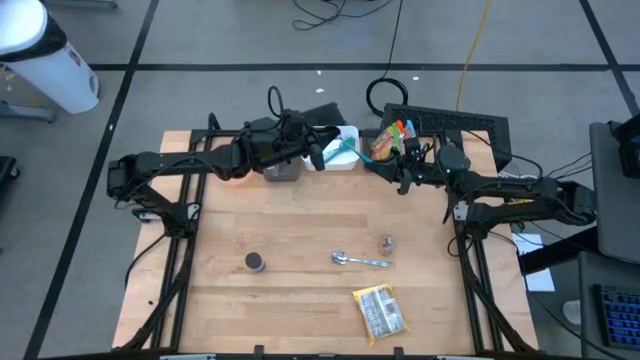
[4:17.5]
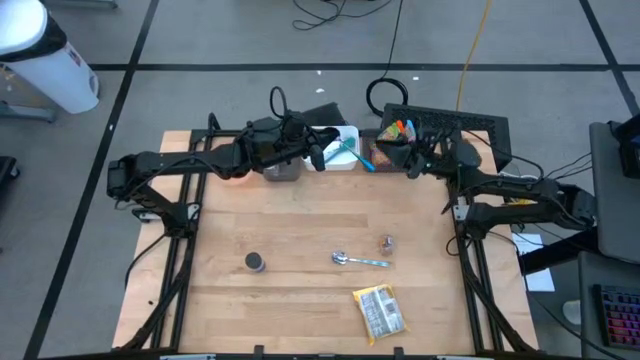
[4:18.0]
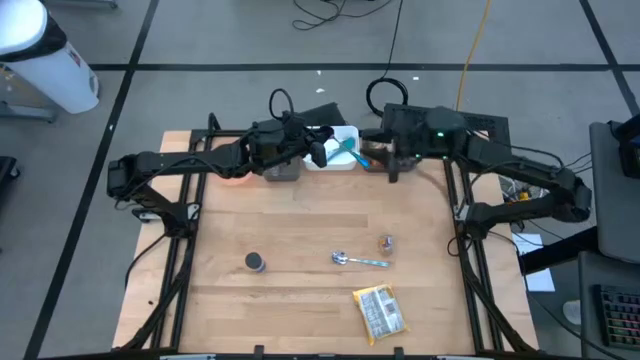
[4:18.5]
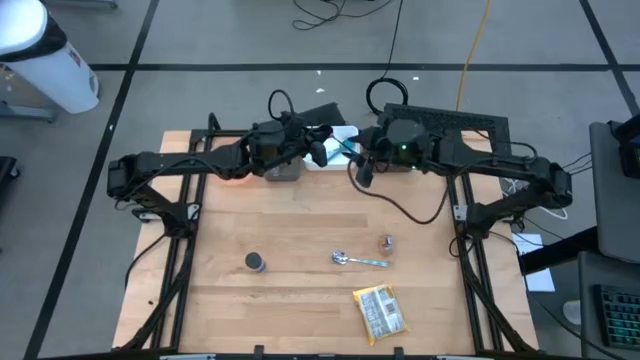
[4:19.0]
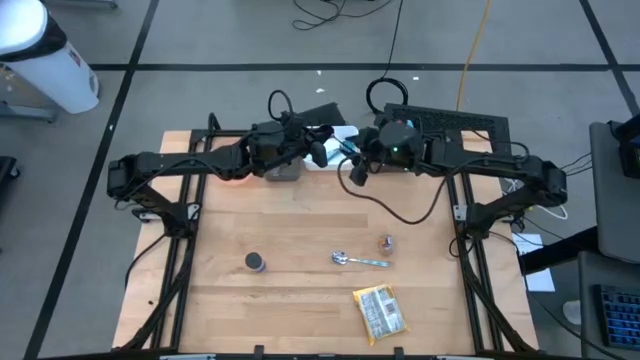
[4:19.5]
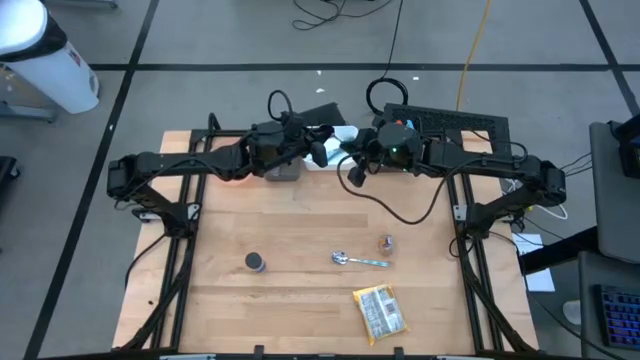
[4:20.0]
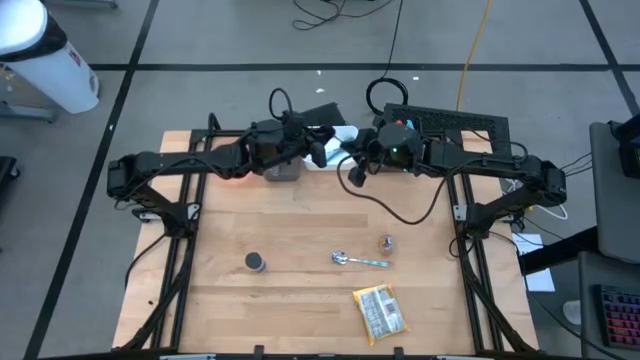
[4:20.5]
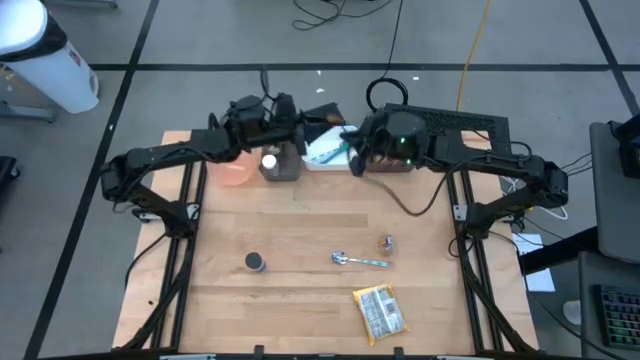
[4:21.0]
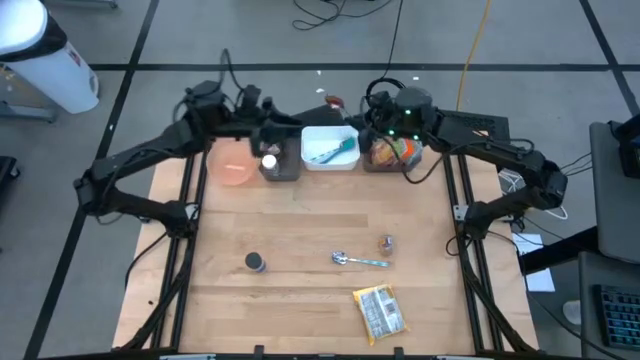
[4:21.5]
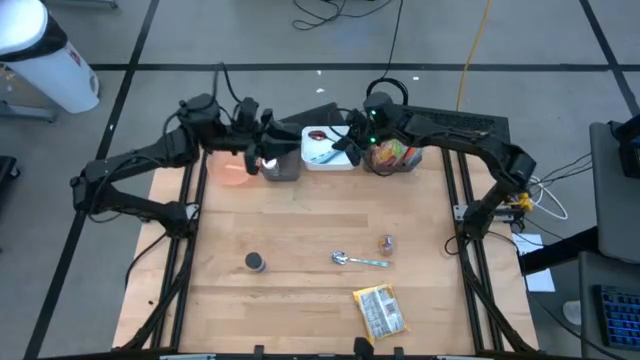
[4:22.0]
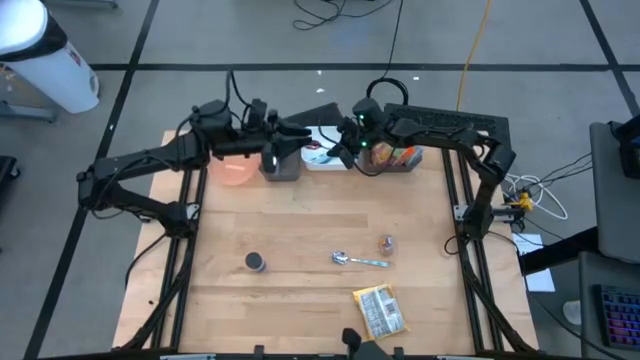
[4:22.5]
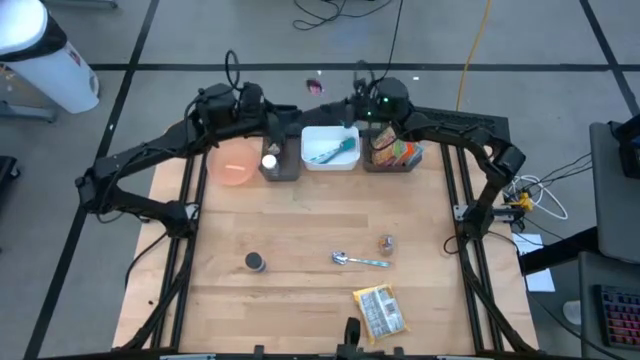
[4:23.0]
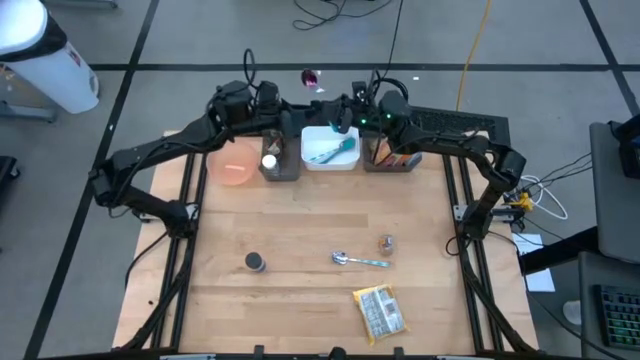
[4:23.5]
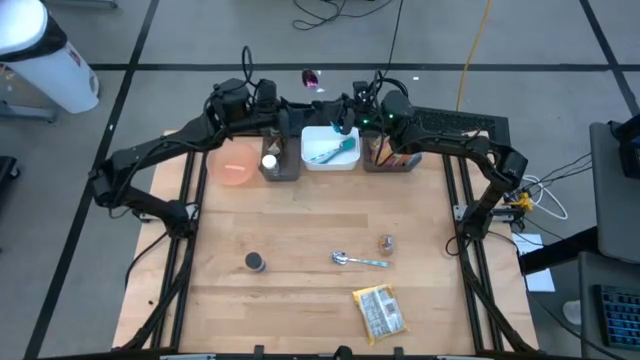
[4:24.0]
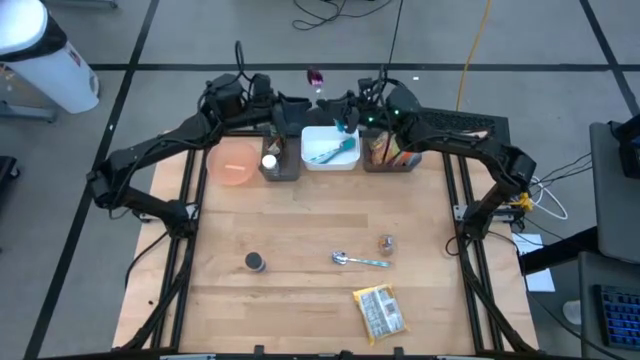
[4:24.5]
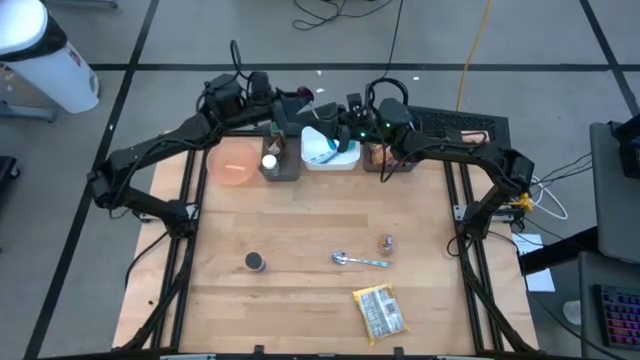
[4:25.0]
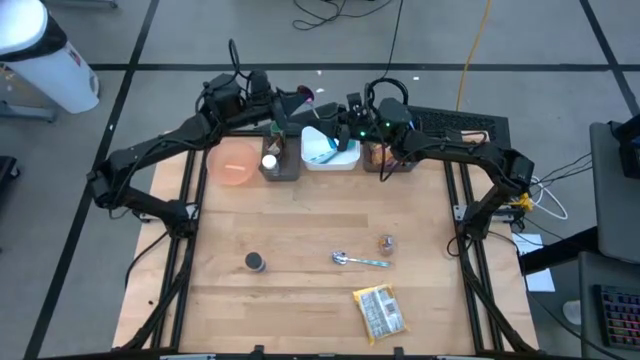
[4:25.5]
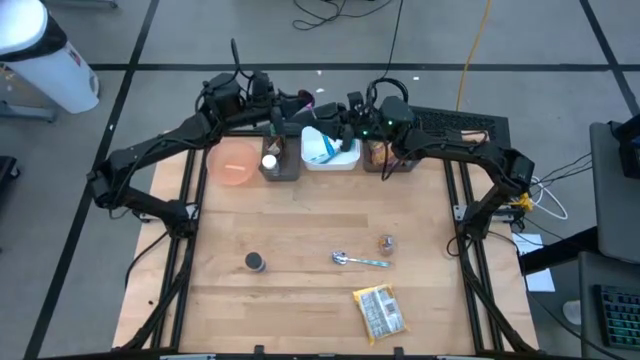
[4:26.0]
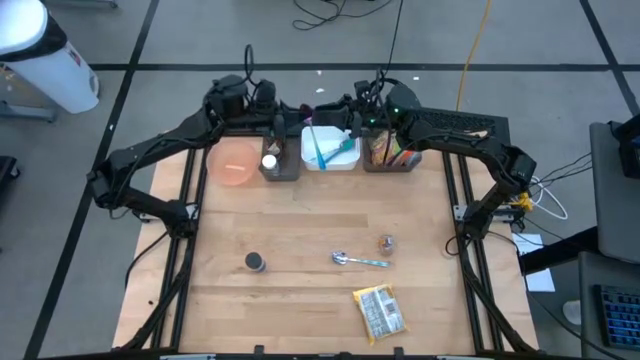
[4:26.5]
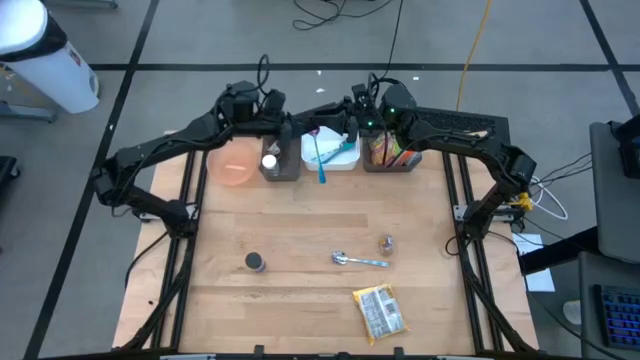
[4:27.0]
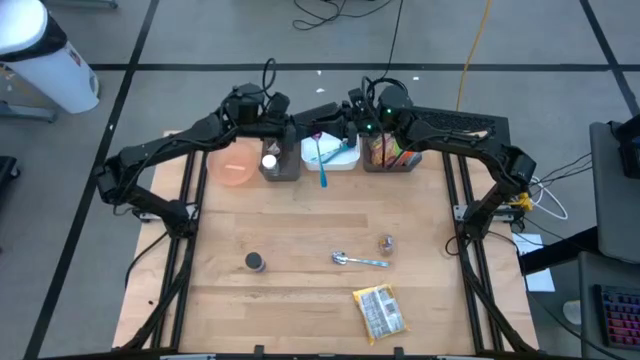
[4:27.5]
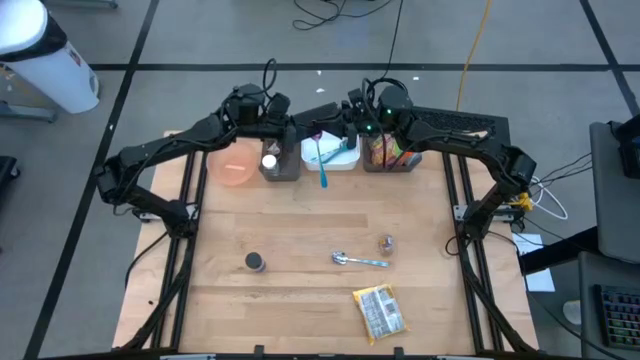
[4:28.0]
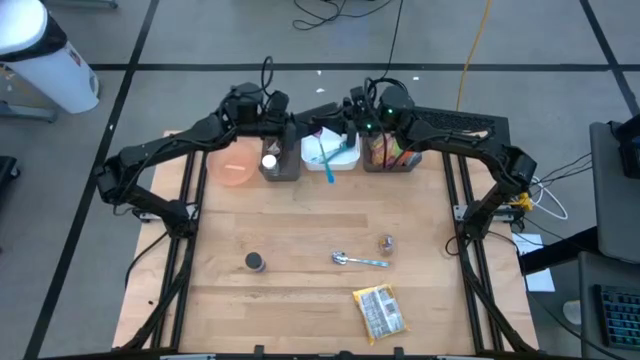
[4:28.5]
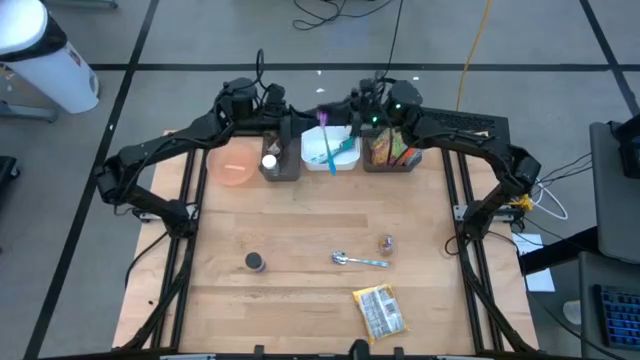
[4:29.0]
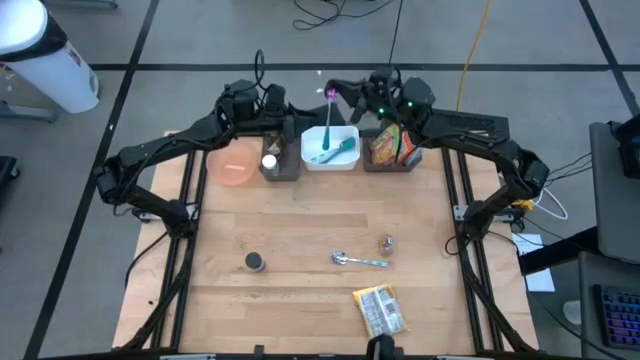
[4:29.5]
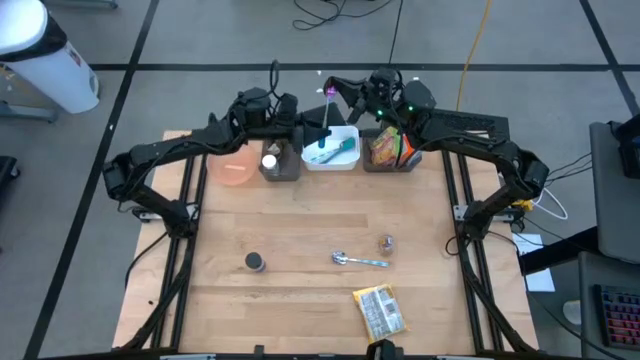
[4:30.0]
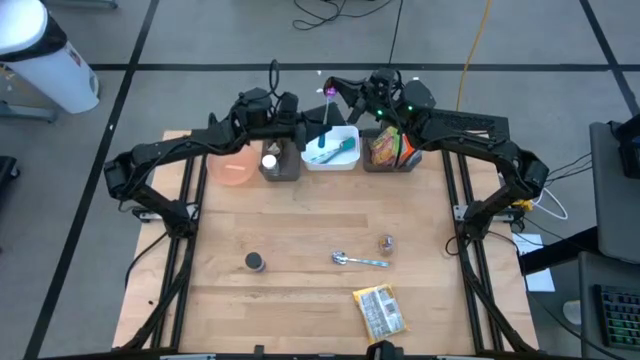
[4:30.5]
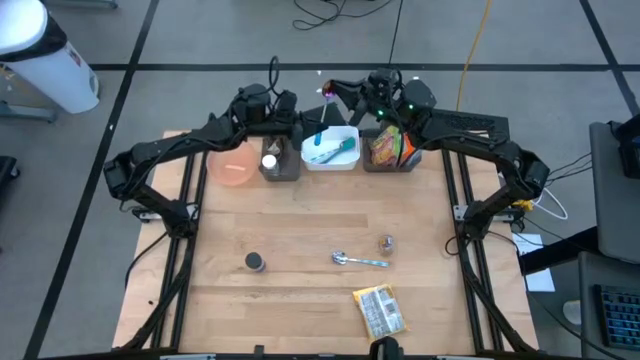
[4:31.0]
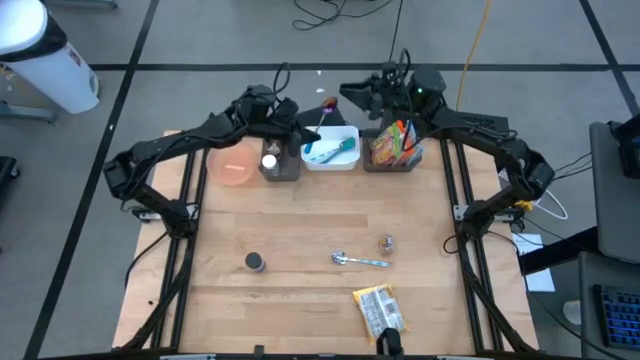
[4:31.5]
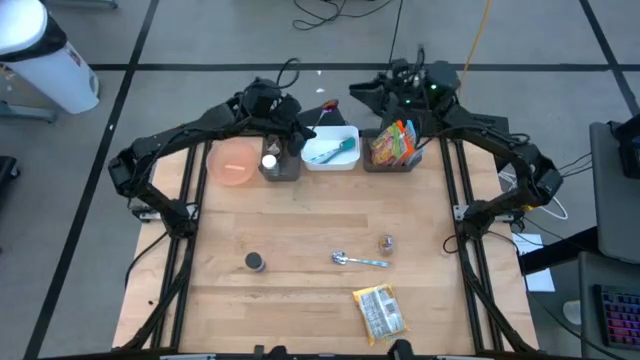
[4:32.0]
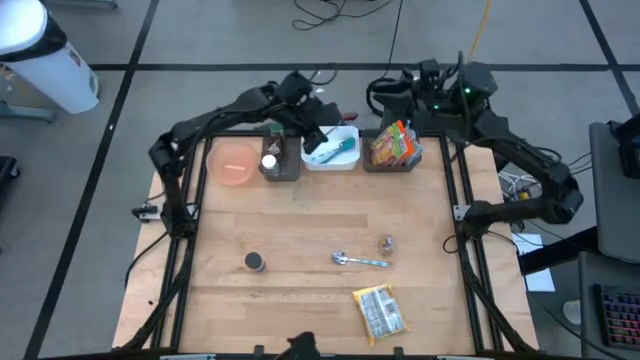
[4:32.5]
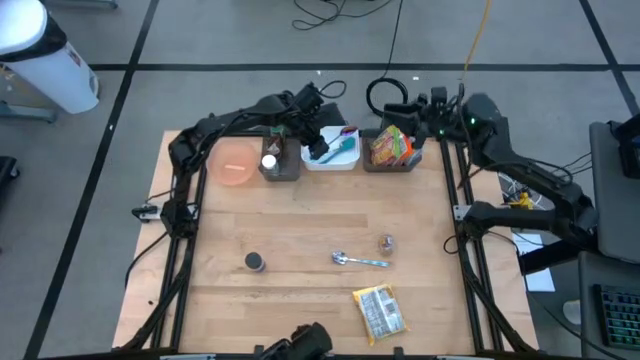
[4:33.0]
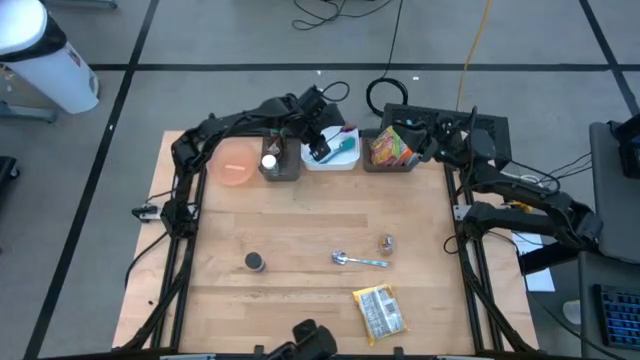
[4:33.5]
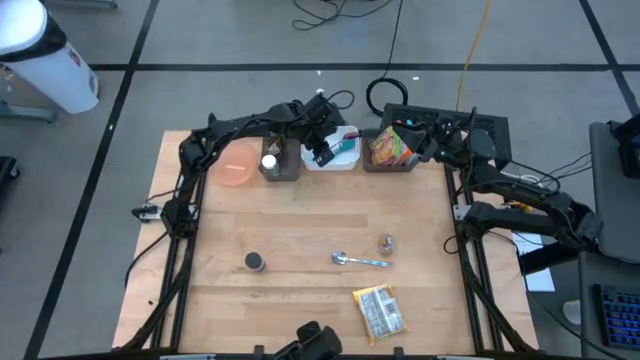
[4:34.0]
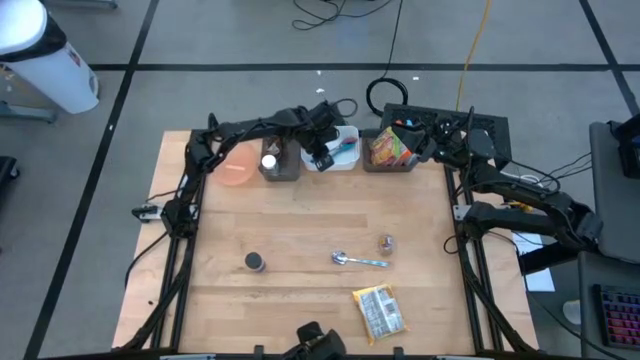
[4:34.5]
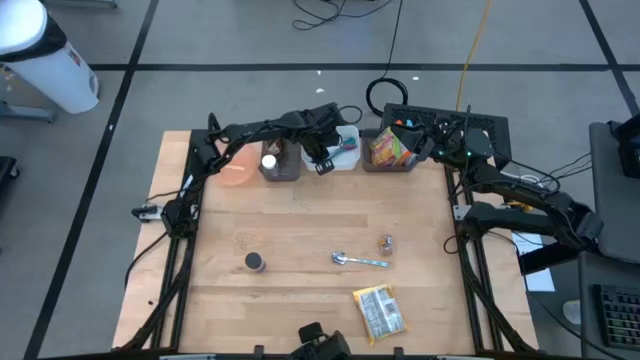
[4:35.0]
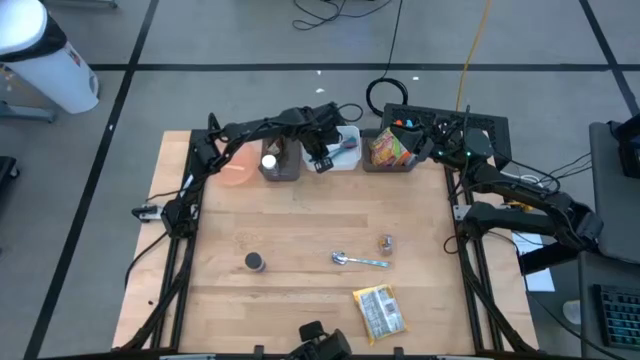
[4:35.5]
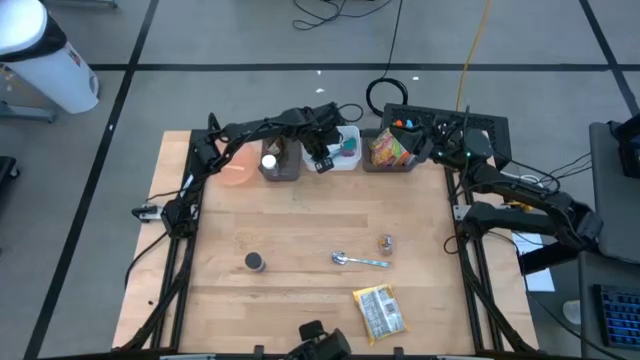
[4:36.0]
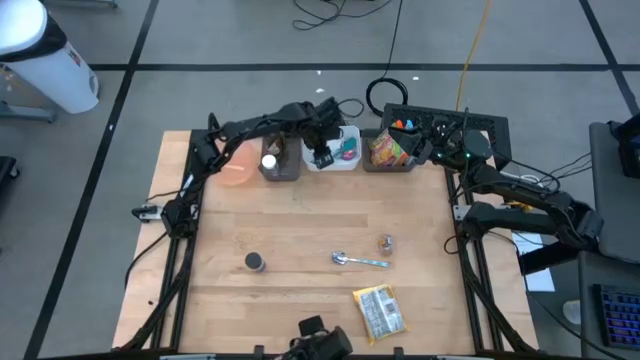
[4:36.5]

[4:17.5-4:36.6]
Task: Pick & Place Food Item
Put the purple spoon into the white bin
